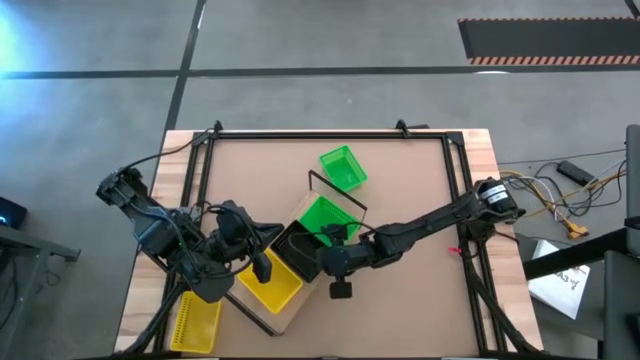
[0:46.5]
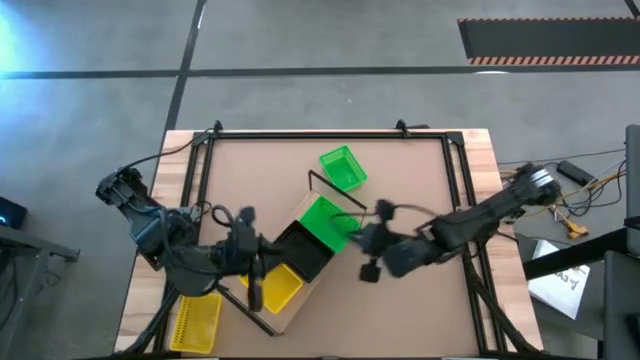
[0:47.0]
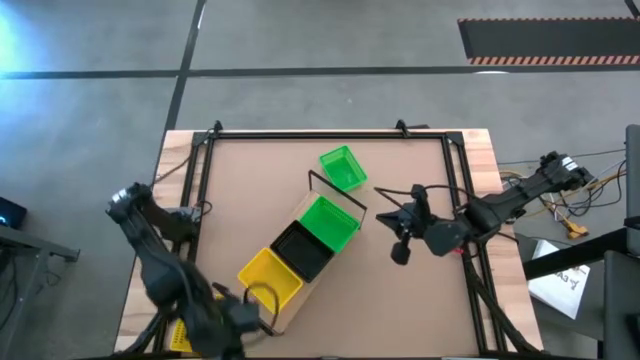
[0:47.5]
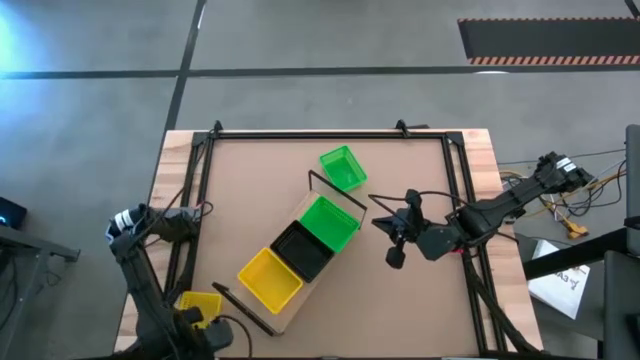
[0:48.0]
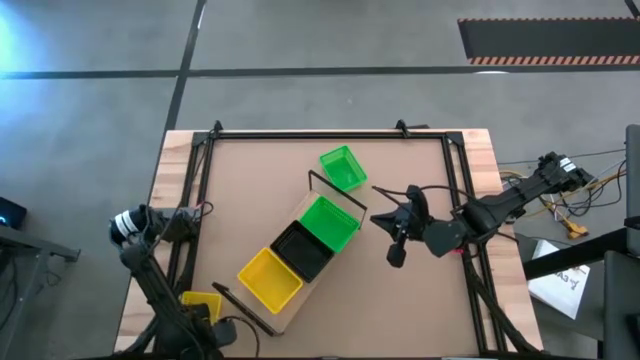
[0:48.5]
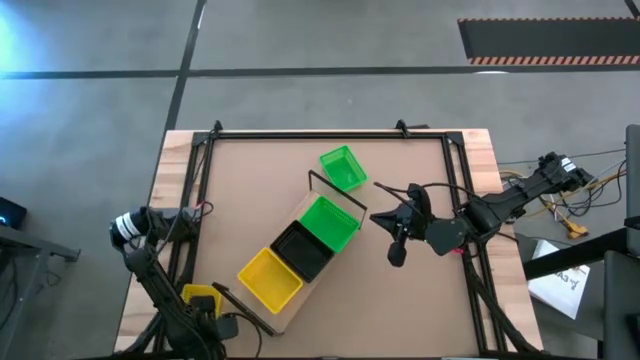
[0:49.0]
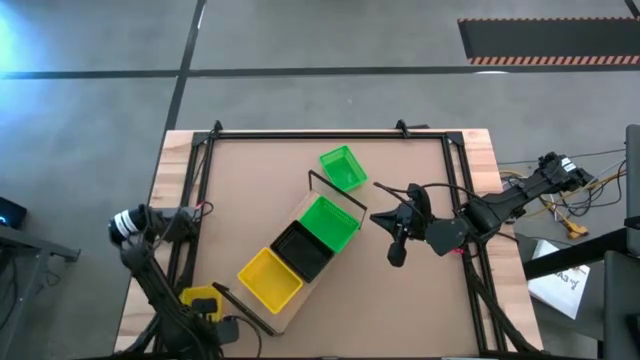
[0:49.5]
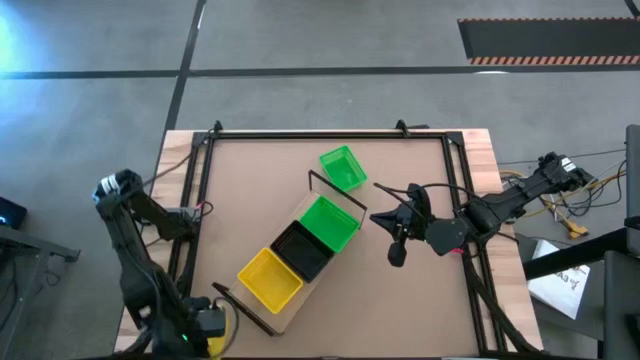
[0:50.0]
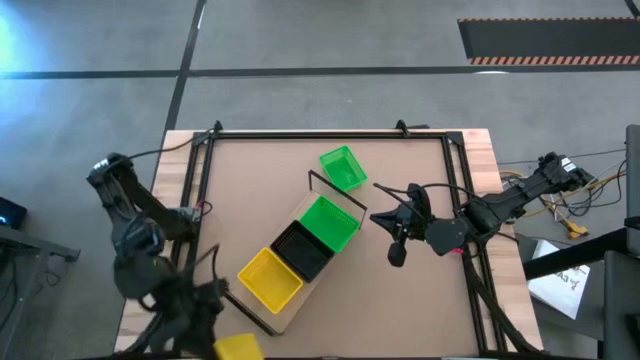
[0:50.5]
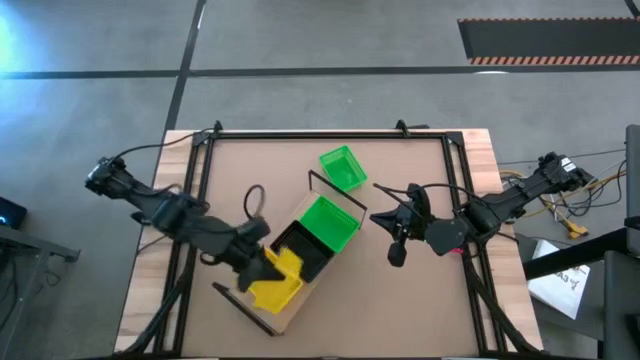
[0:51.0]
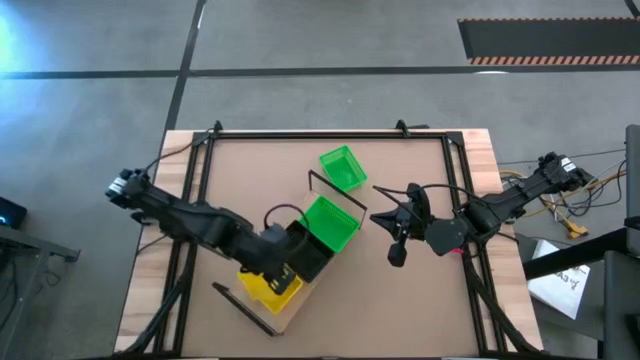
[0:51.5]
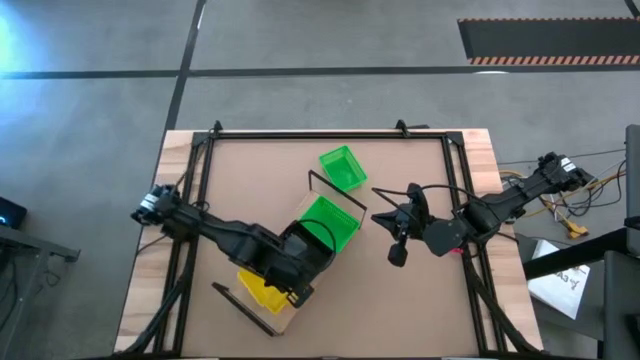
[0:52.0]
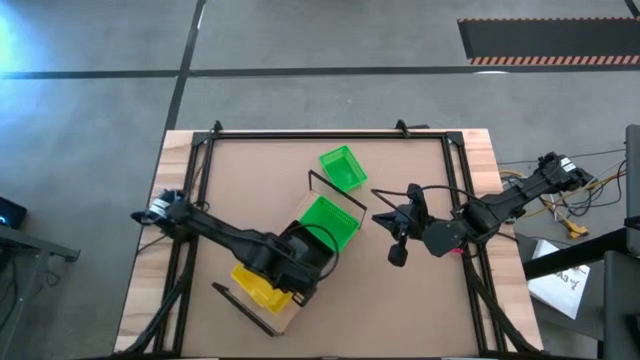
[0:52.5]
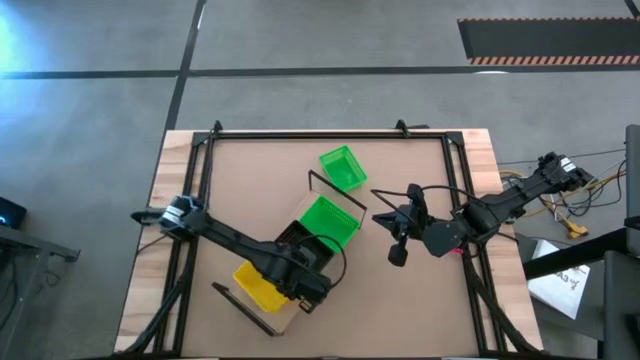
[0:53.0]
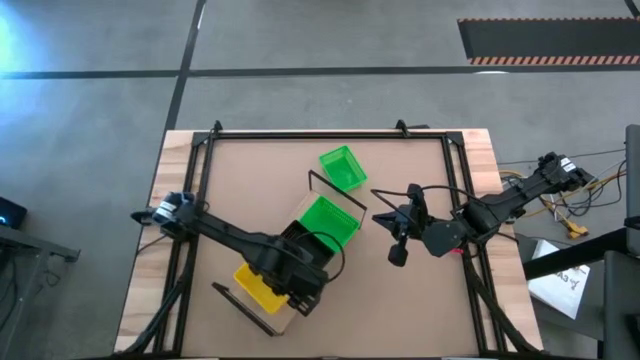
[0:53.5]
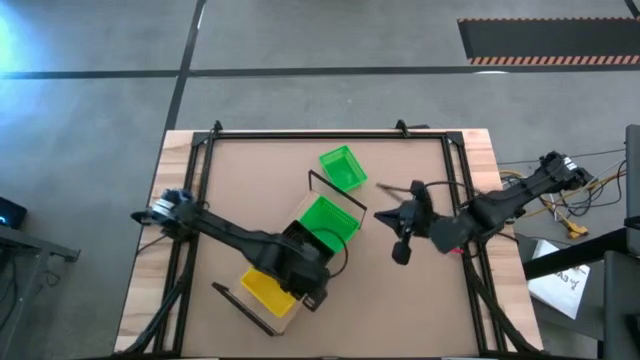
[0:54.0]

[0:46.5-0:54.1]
Task: Stack baskets on shelf by color
Stack the yellow bin on top of the yellow bins on the shelf

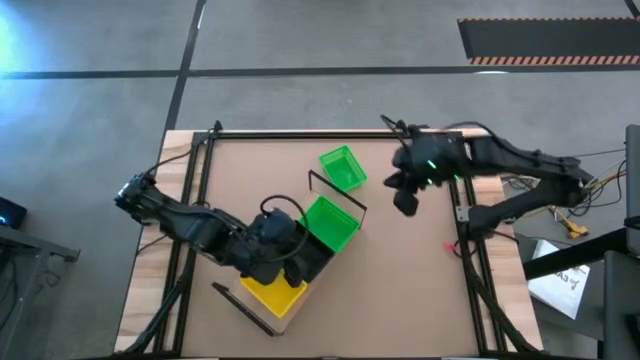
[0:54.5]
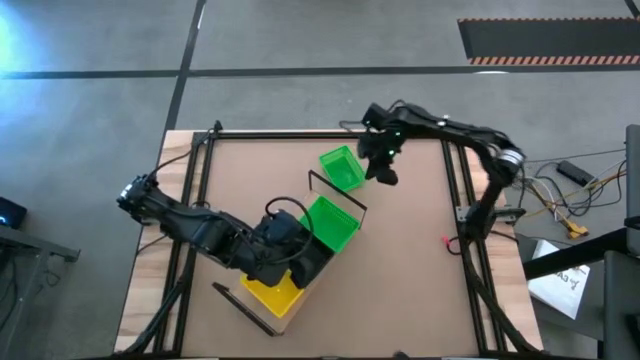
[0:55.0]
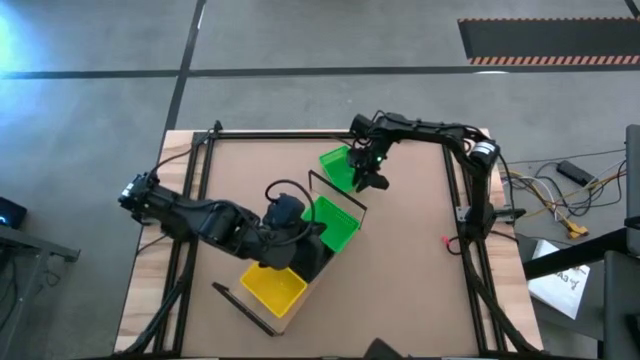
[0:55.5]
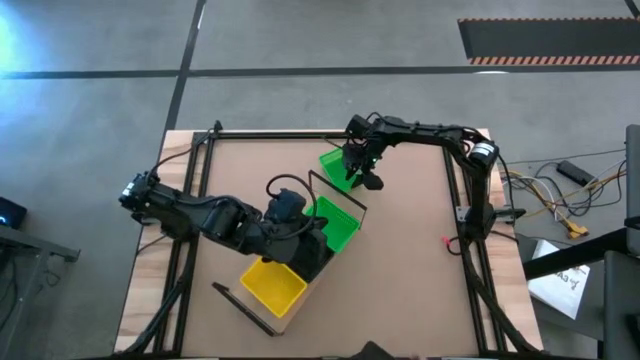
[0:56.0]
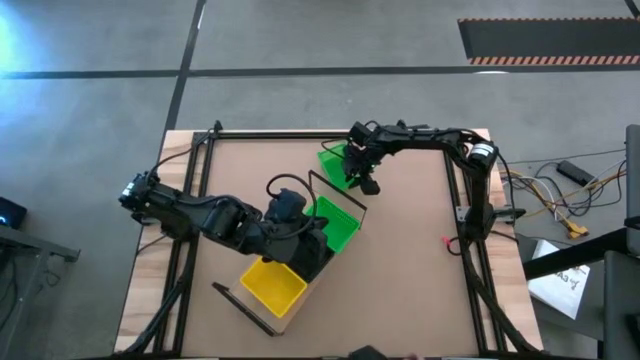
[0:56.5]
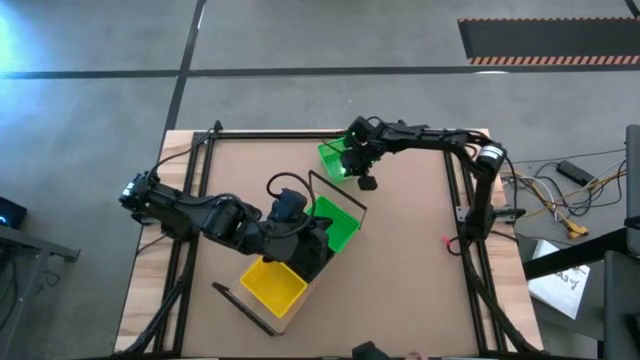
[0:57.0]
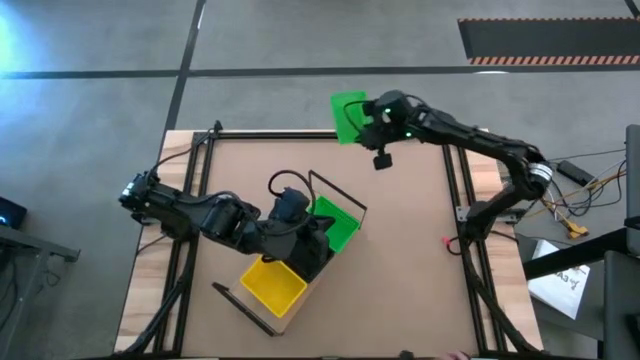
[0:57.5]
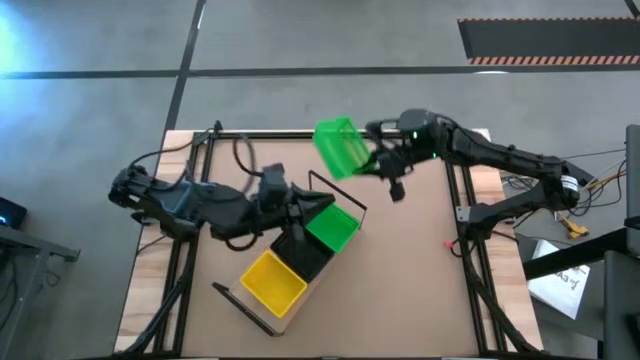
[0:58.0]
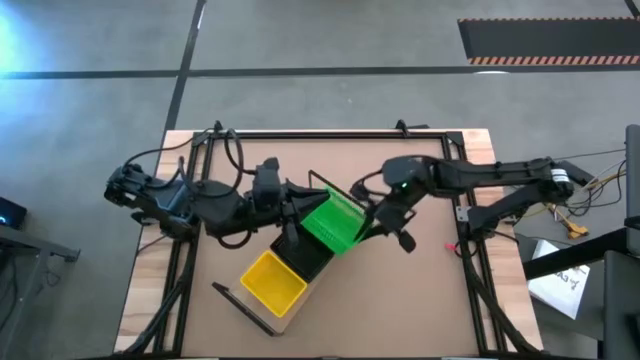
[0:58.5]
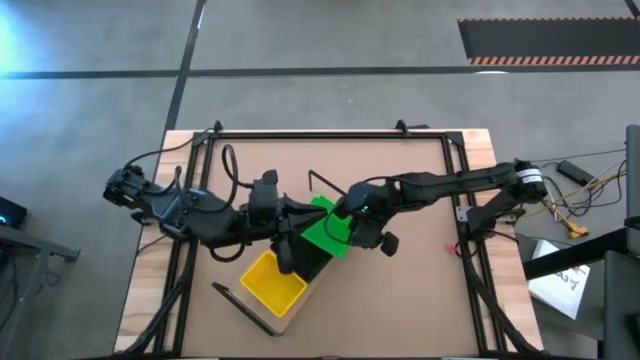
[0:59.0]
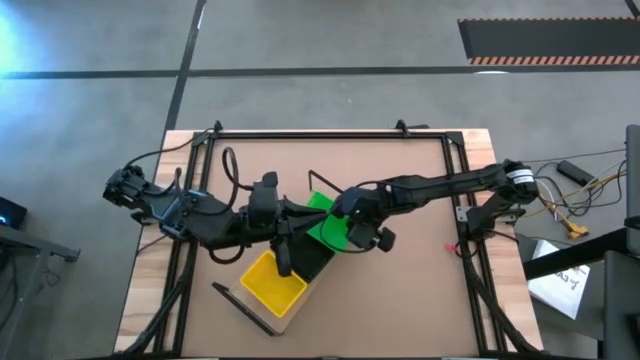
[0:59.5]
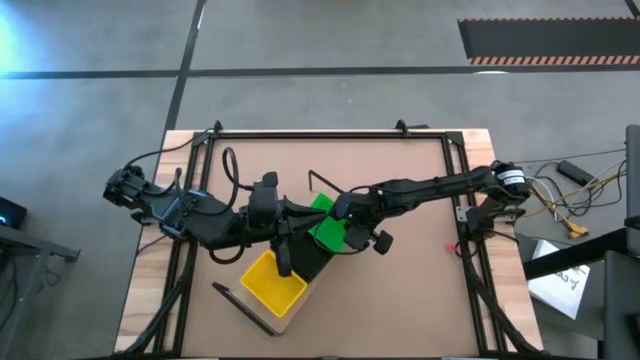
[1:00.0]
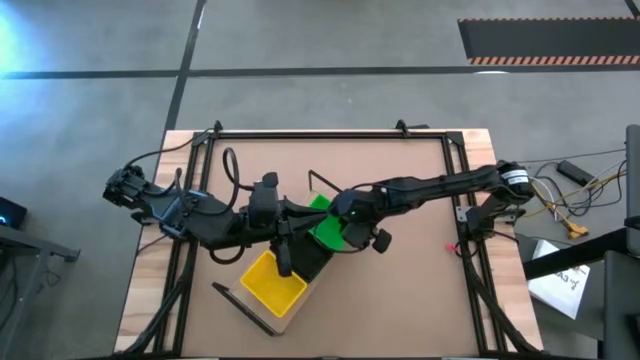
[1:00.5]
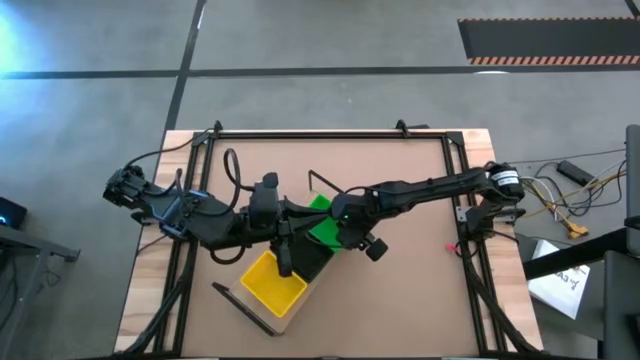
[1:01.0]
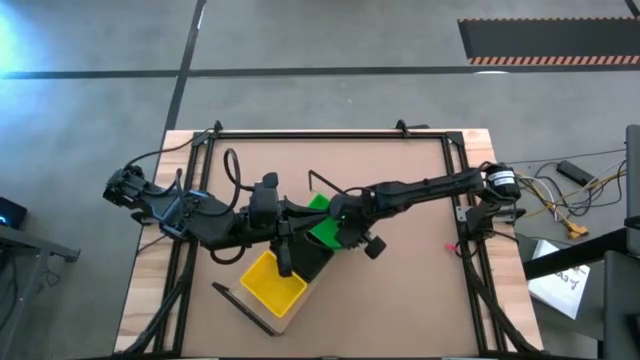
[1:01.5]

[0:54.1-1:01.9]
Stack the green bin on top of the green bins on the shelf

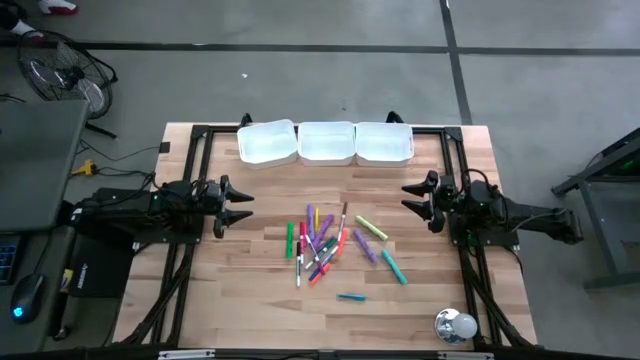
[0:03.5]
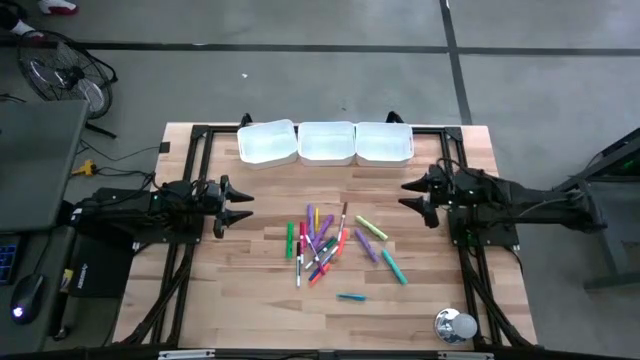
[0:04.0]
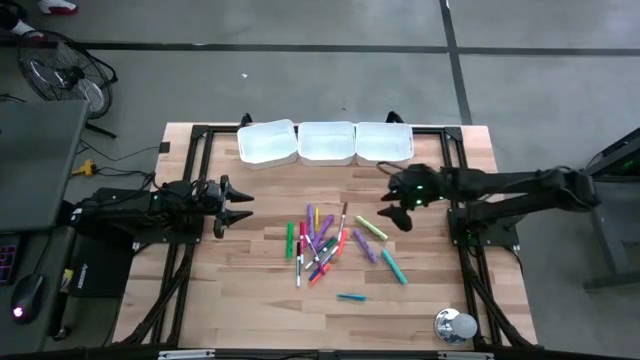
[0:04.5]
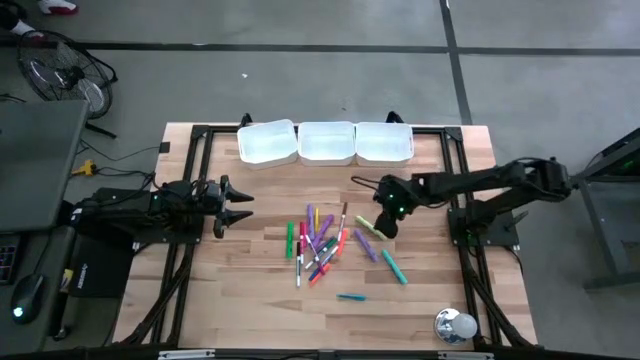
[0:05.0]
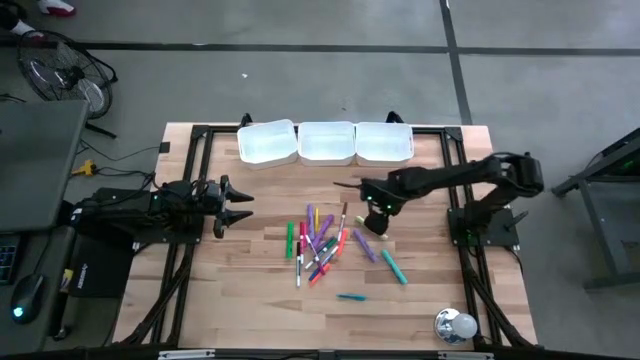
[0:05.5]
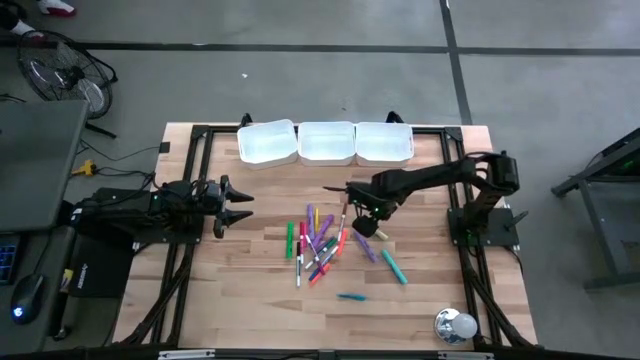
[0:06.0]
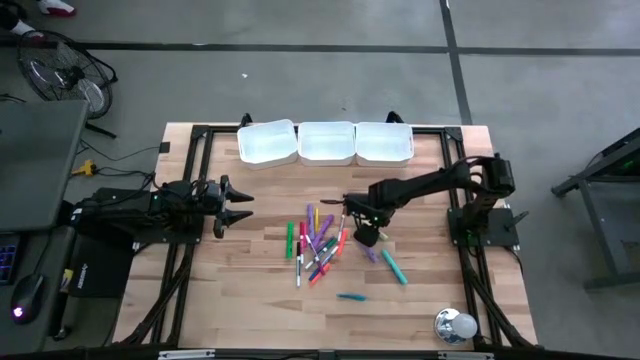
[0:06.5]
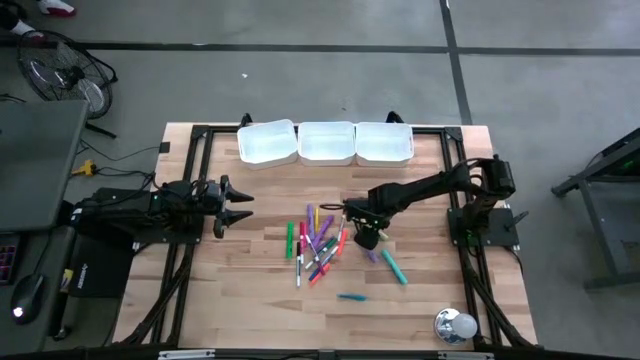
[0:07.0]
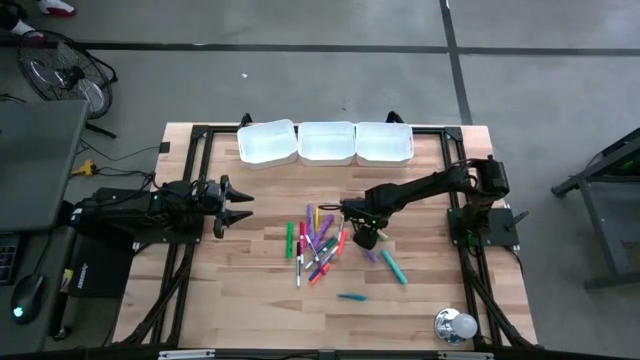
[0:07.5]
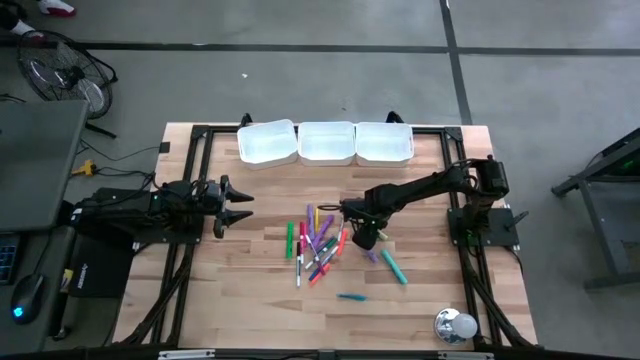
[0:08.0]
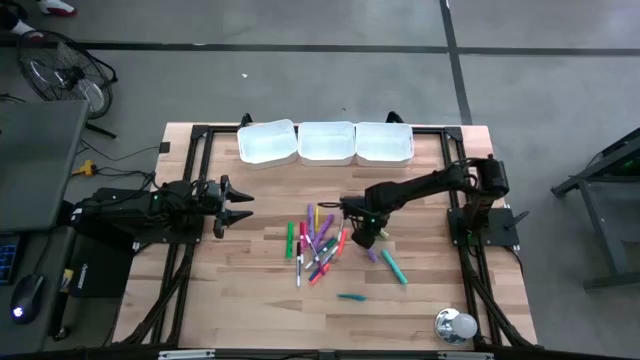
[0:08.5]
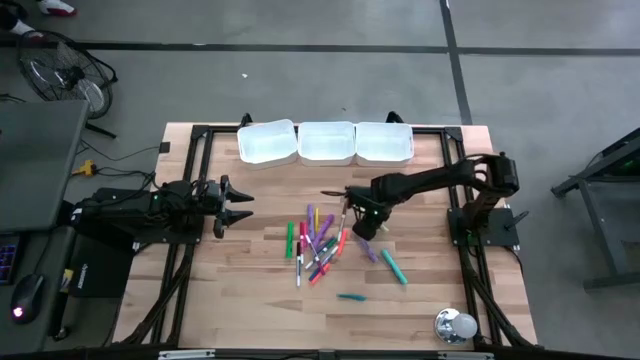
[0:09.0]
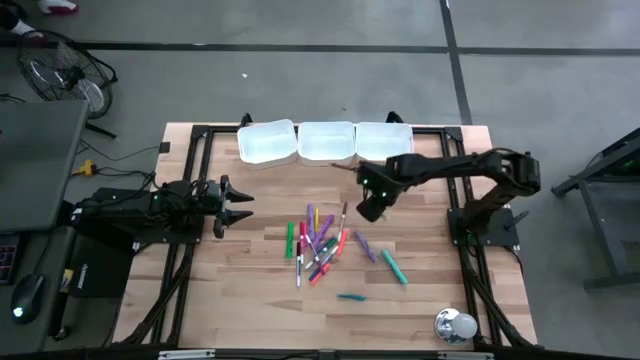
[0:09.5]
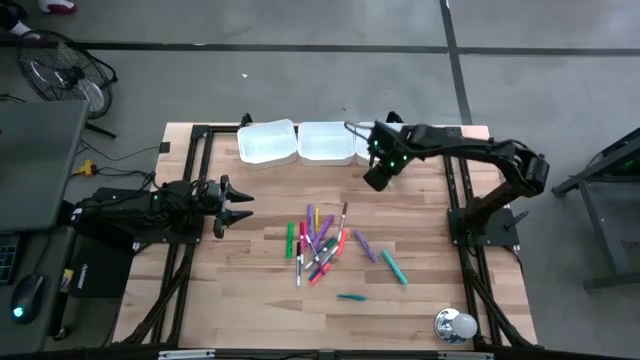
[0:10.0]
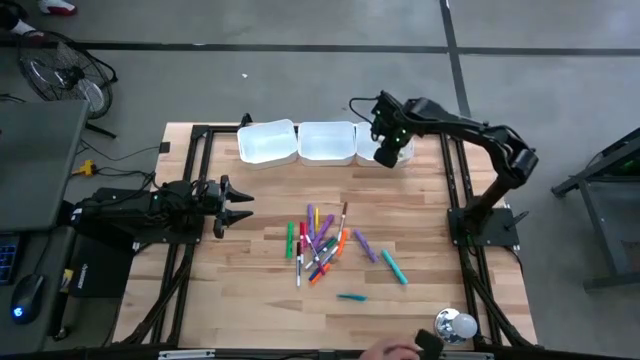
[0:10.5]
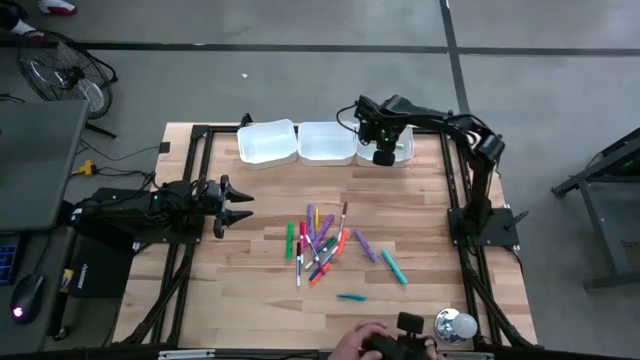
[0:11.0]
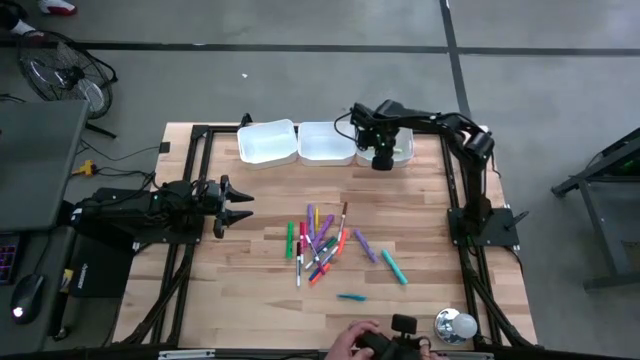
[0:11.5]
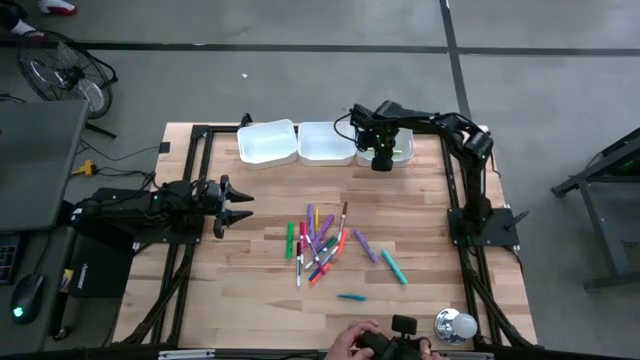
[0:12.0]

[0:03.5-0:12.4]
Task: Pick & Place Markers
Put the light green highlighter pen into the right white bin
